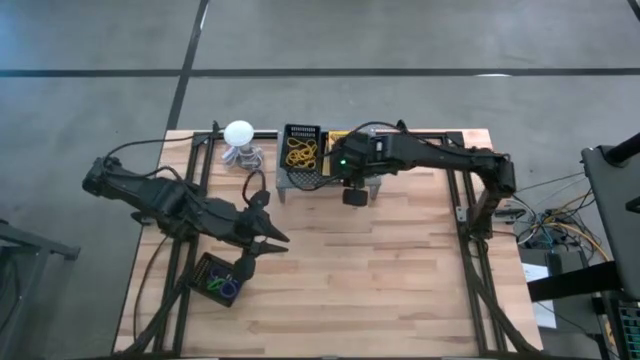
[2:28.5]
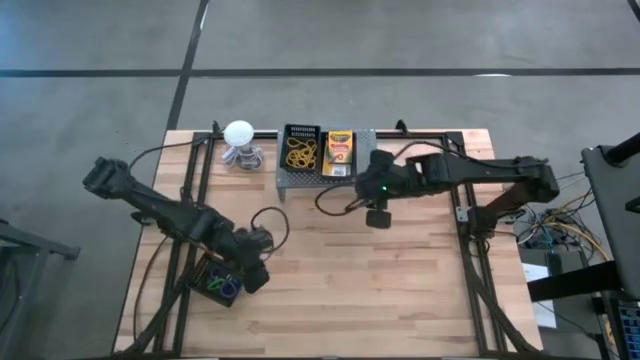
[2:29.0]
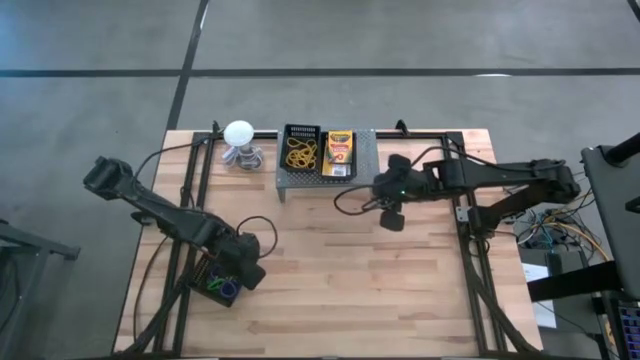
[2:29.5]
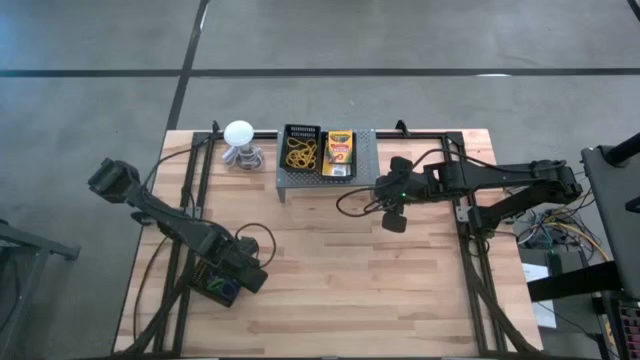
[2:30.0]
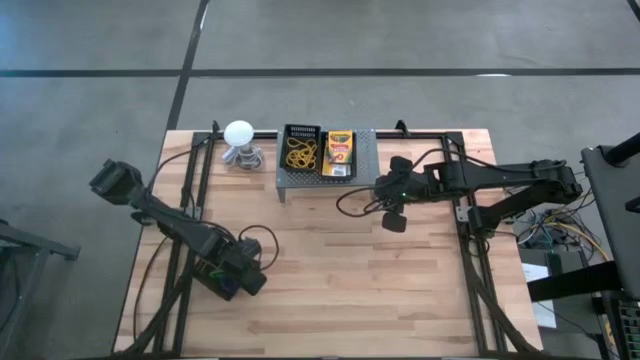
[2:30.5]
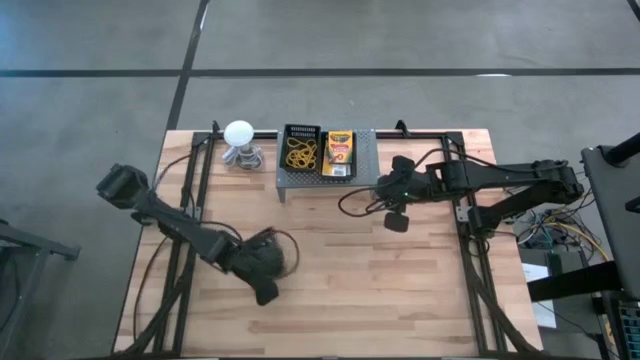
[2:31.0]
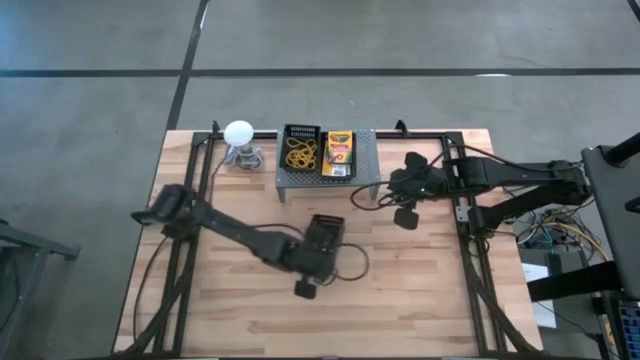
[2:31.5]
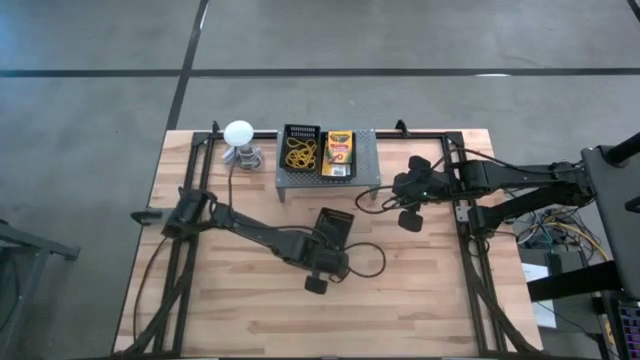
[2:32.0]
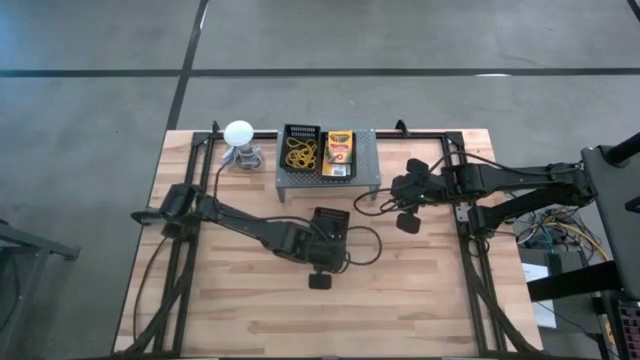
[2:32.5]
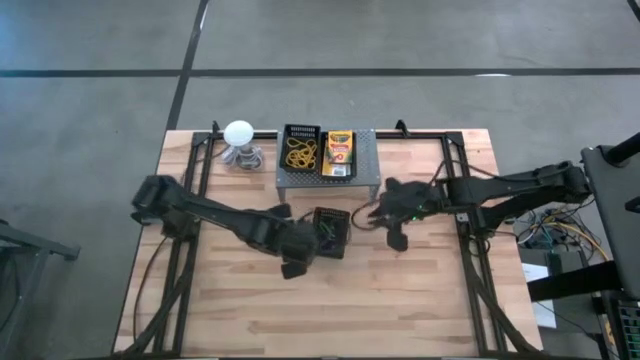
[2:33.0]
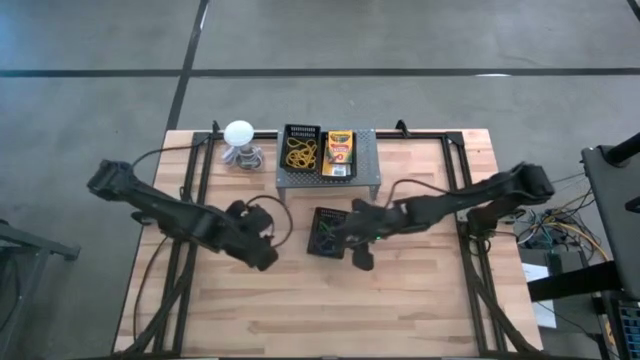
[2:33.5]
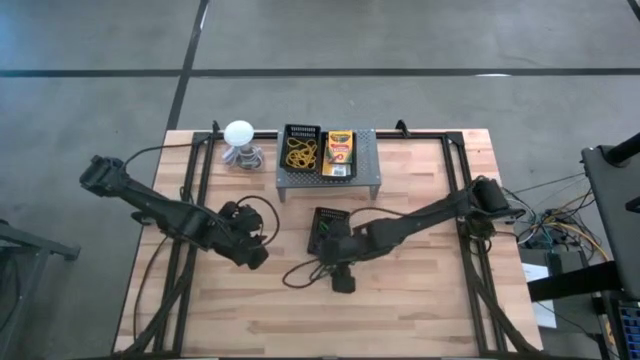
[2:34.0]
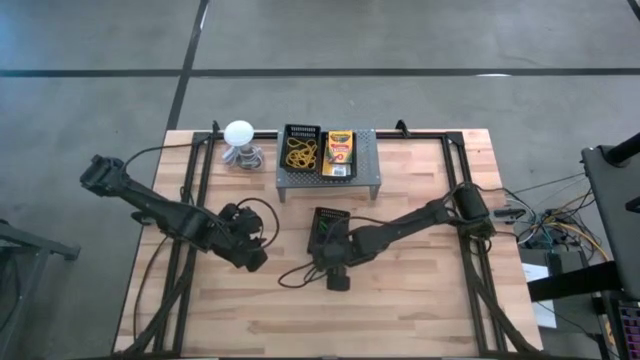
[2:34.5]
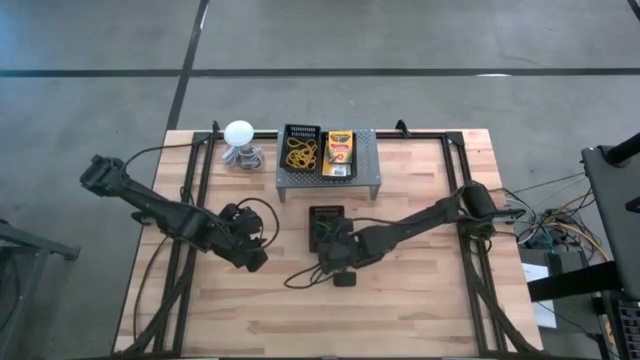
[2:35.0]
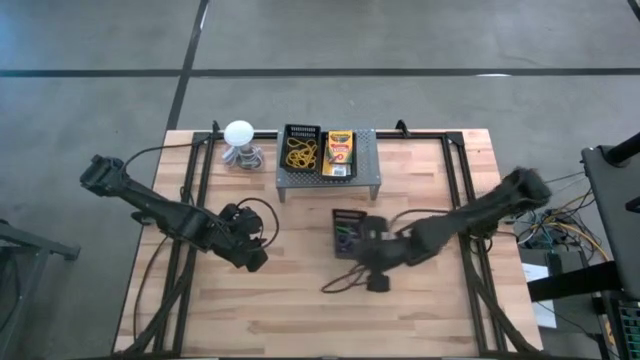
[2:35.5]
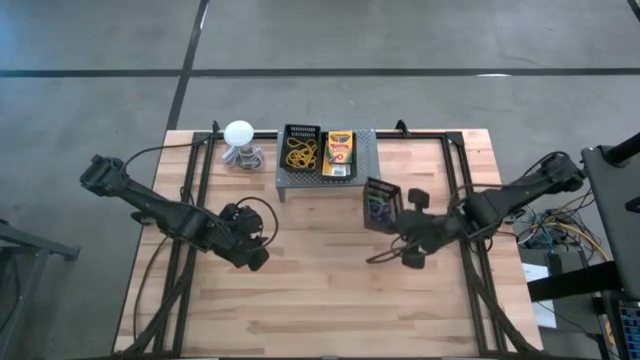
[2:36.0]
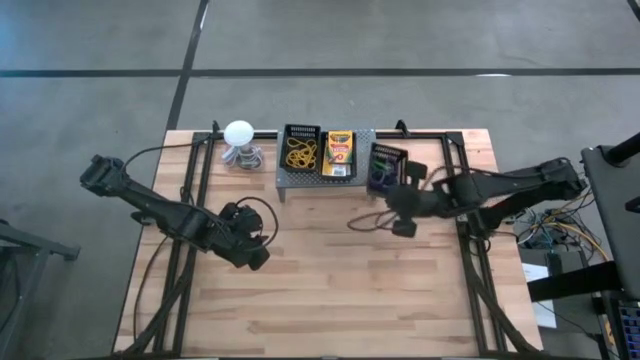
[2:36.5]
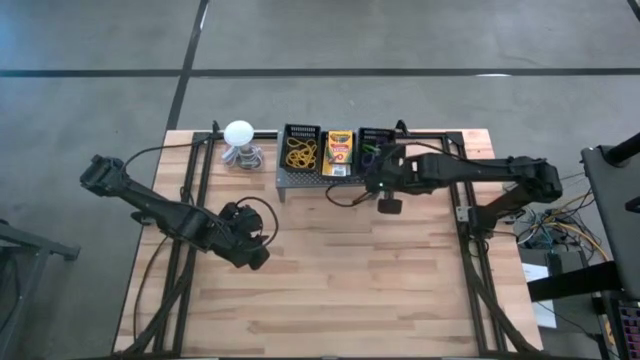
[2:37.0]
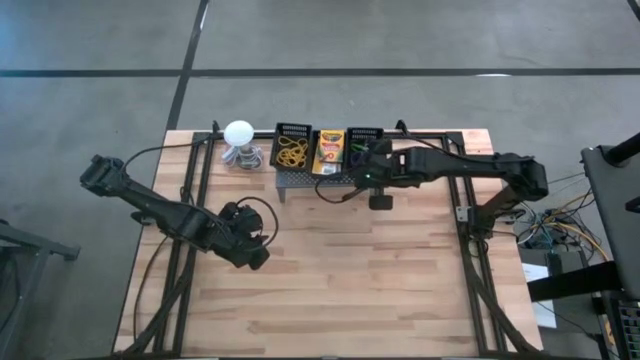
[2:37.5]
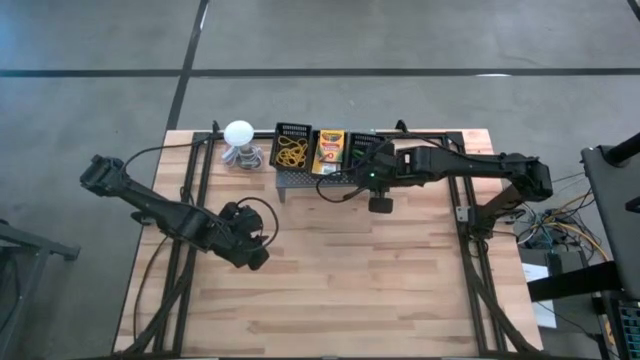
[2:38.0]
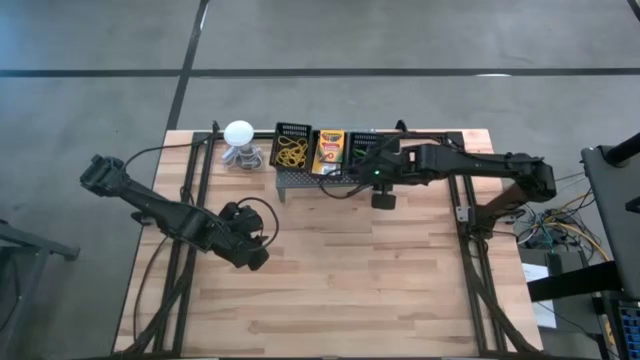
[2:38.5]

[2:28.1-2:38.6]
Task: Pick & Place Office Desk Supplies
Put the black bin on the shelf

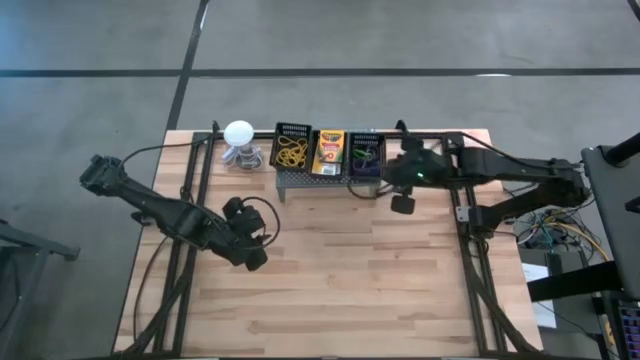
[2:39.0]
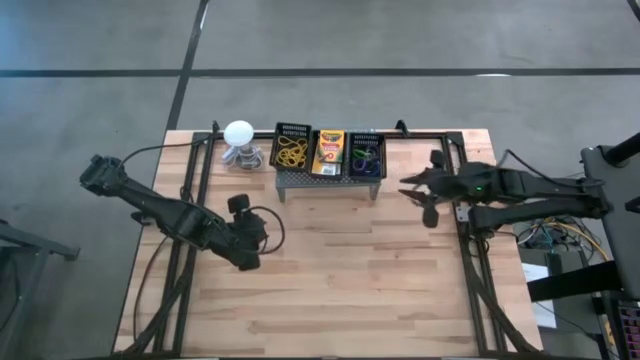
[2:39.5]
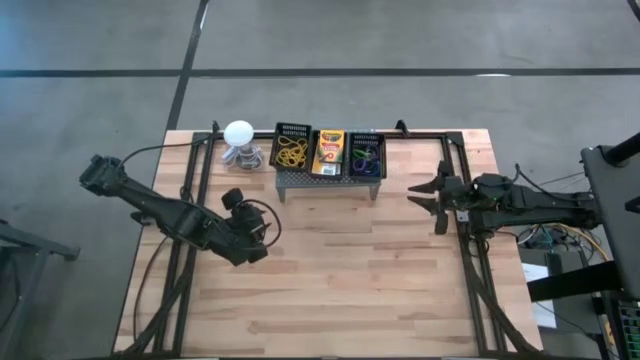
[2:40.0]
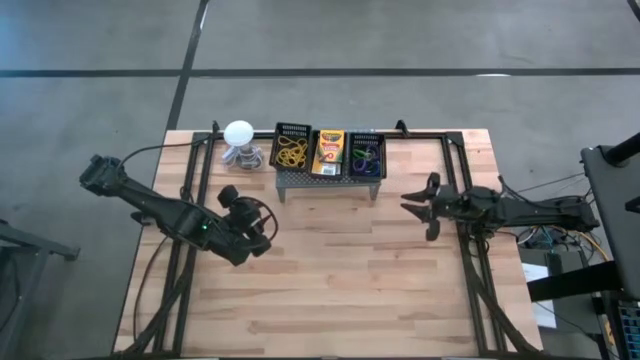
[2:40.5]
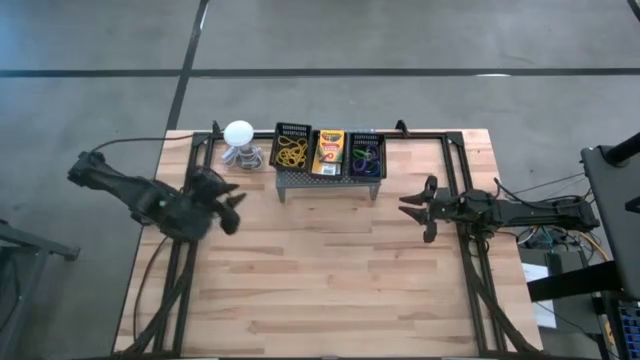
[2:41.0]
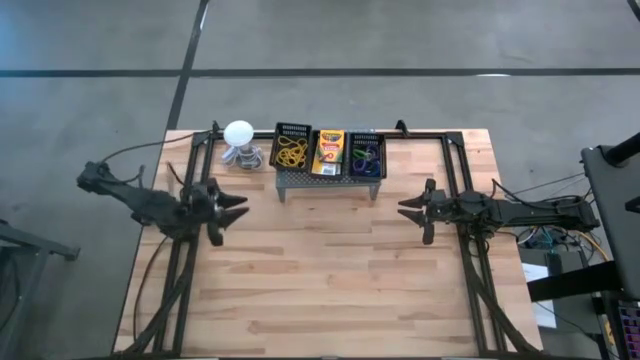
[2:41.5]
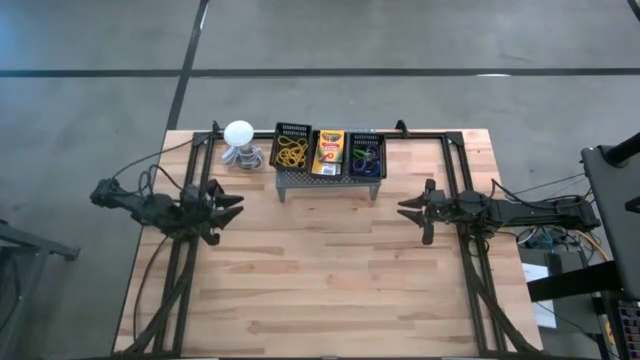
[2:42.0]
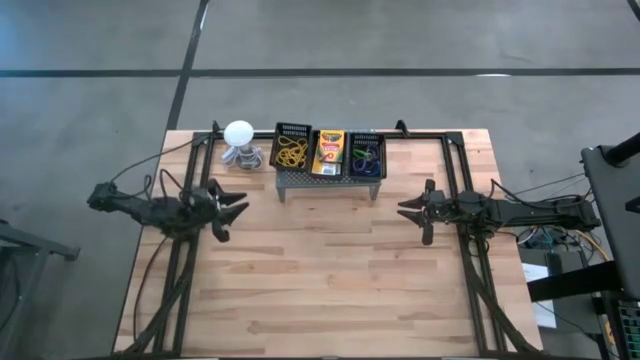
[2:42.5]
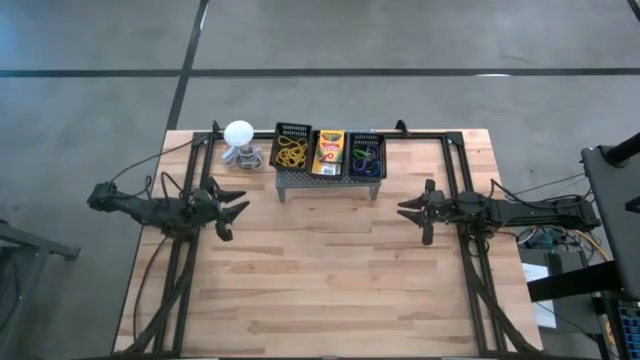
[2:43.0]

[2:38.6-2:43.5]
Return to Home Position

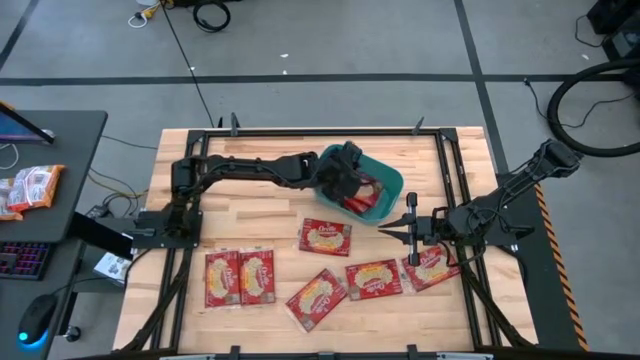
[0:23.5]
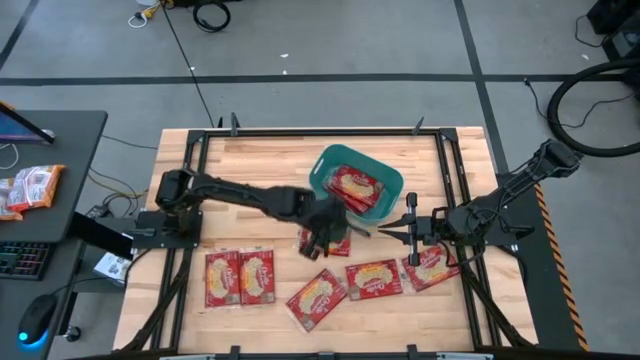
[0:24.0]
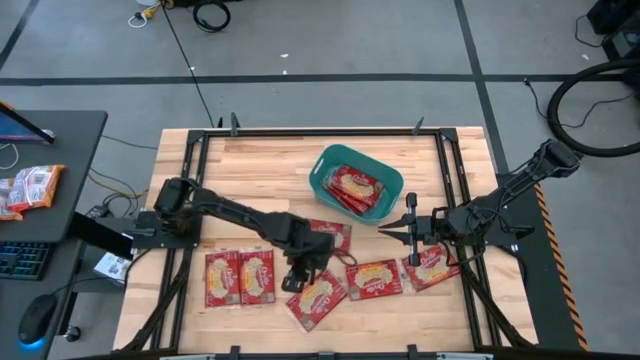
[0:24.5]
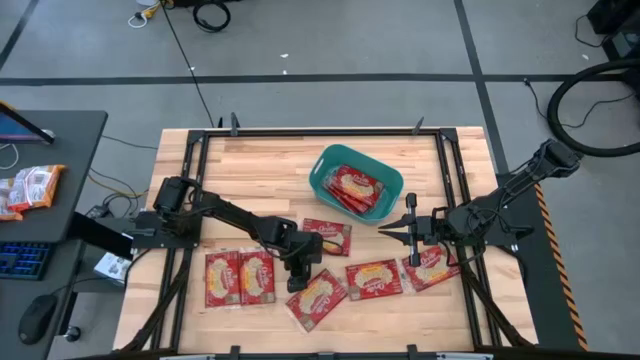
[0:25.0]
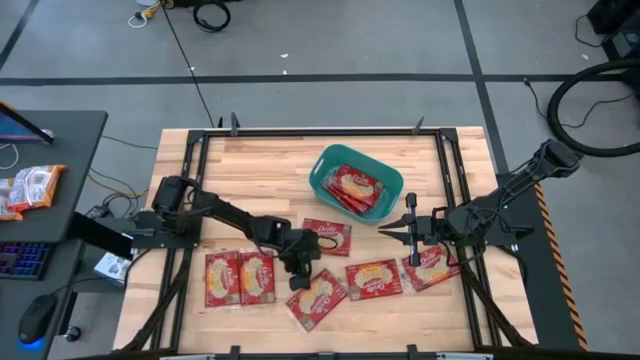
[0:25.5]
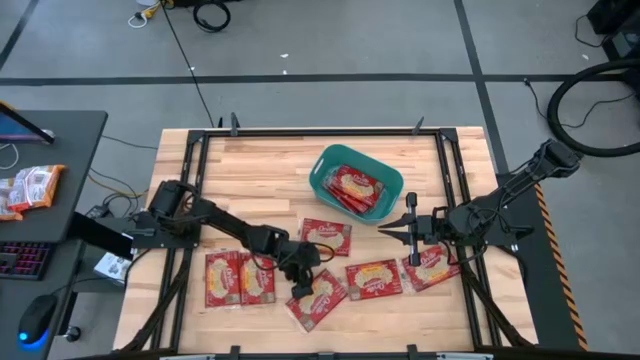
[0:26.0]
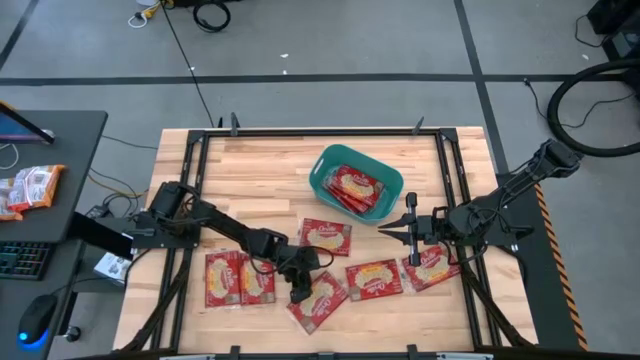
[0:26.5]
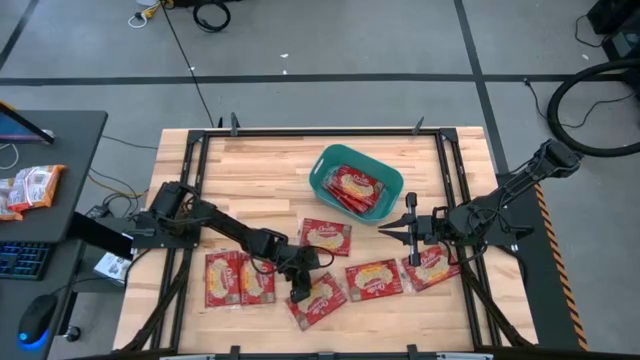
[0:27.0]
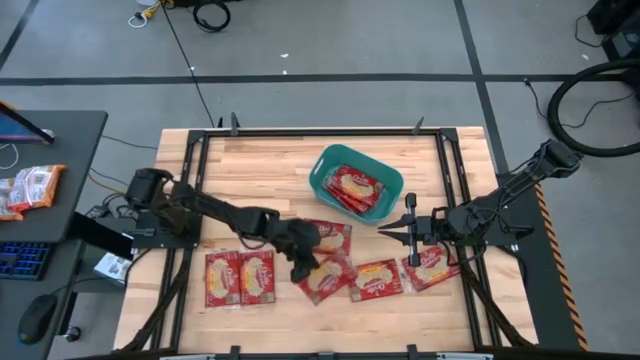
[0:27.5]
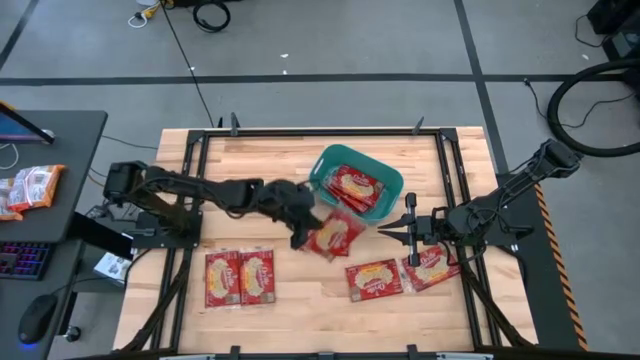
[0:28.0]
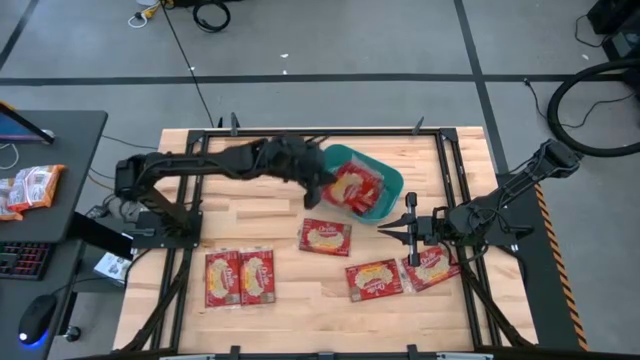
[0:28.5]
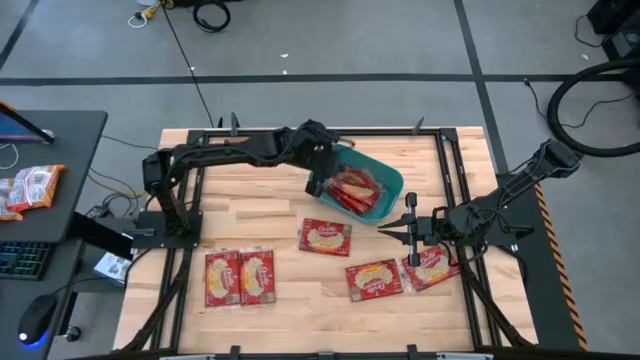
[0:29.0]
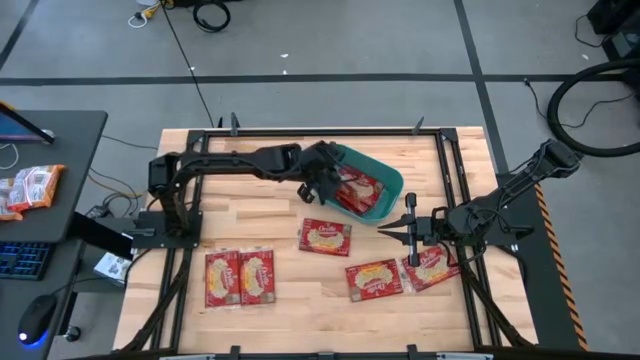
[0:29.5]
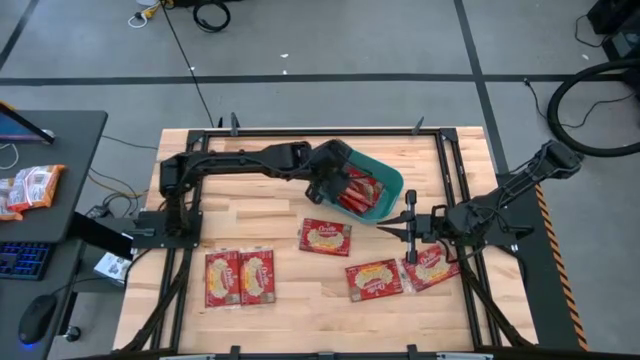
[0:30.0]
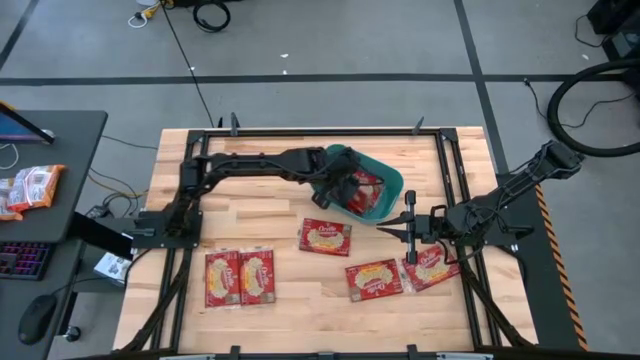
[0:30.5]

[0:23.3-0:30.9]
Task: Sort popcorn bags into baskets
Put the red popcorn bag into the green bin
